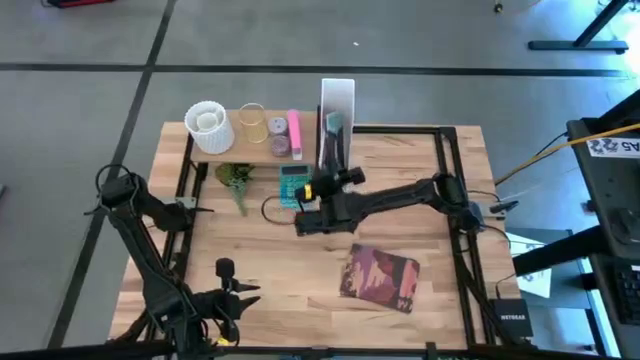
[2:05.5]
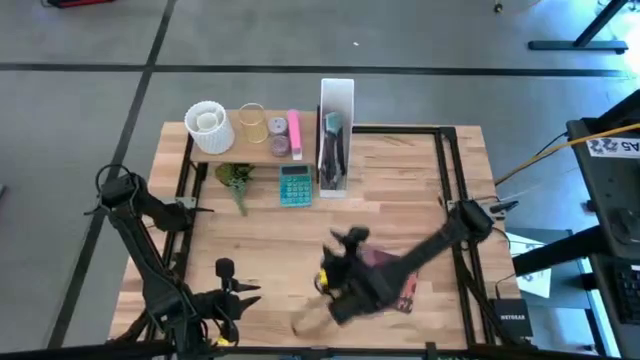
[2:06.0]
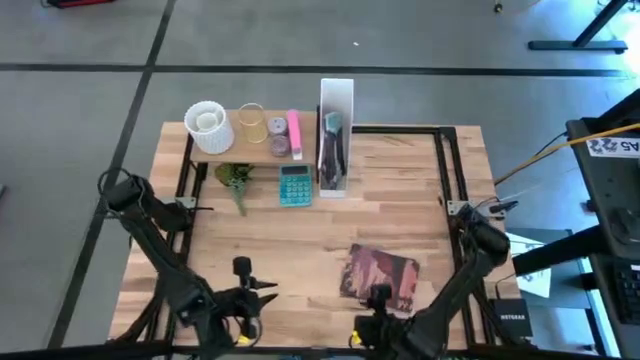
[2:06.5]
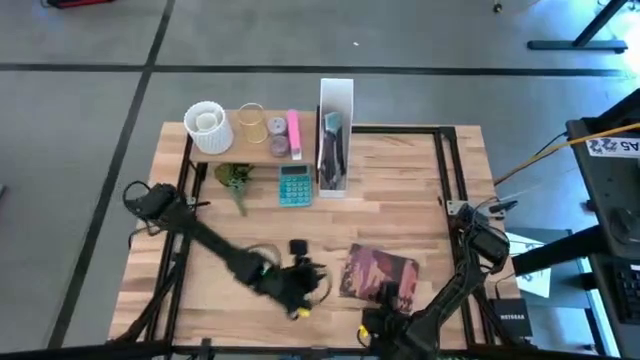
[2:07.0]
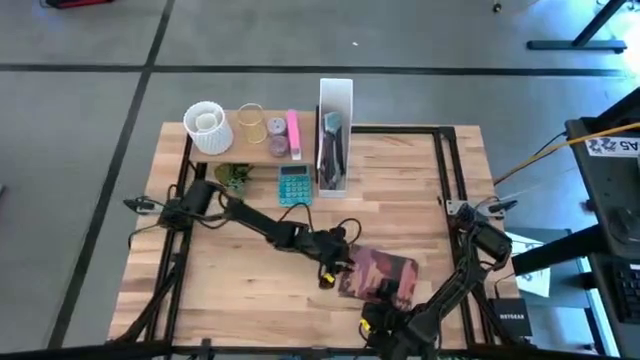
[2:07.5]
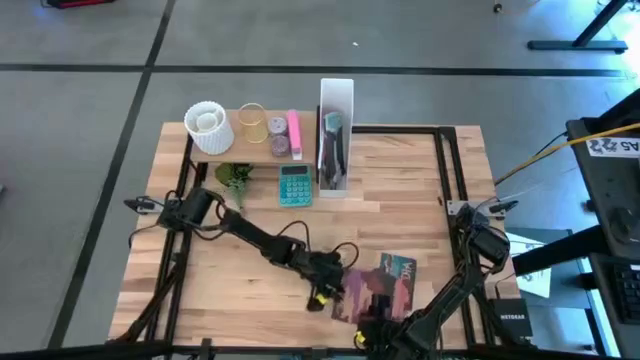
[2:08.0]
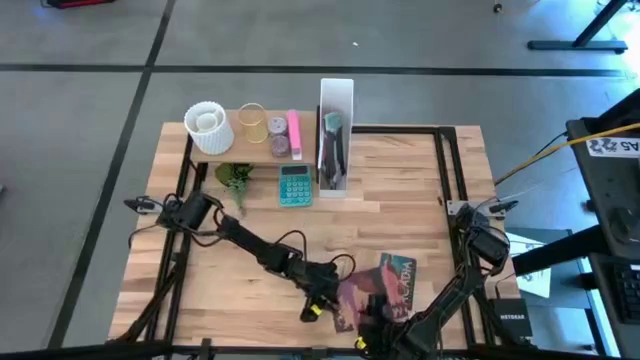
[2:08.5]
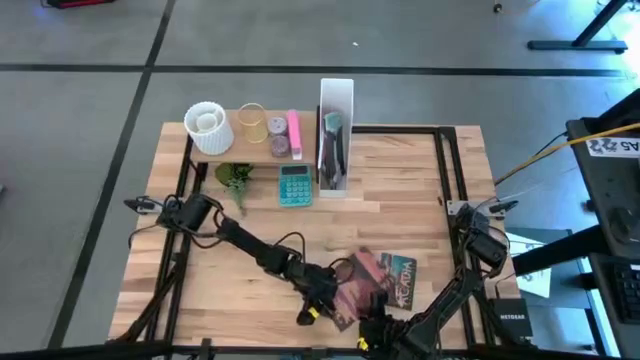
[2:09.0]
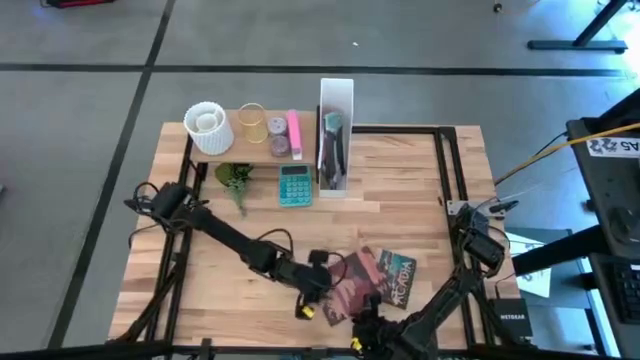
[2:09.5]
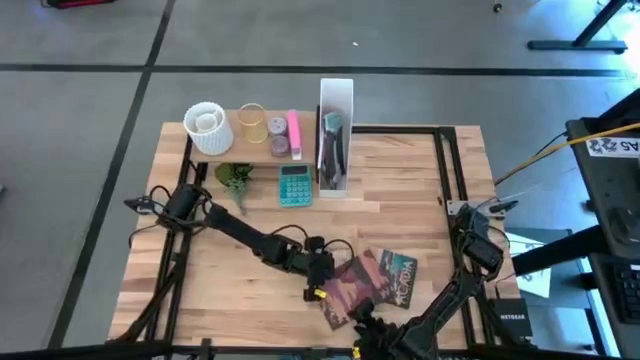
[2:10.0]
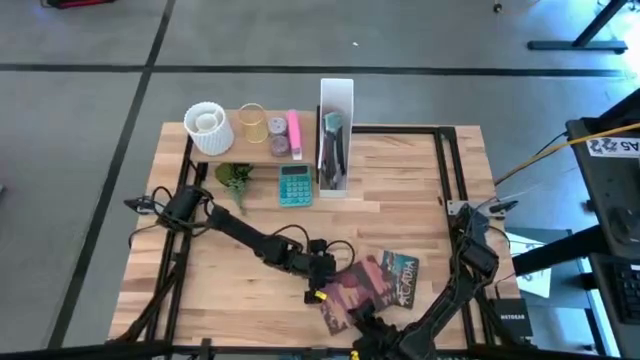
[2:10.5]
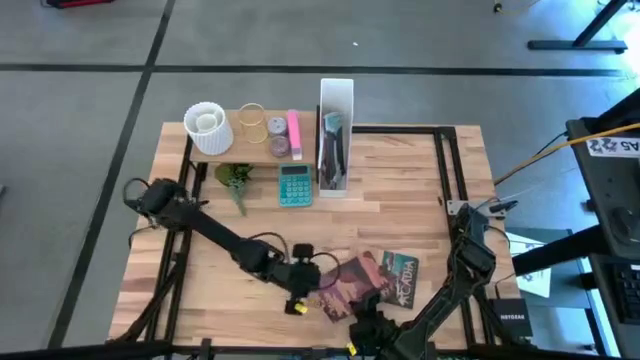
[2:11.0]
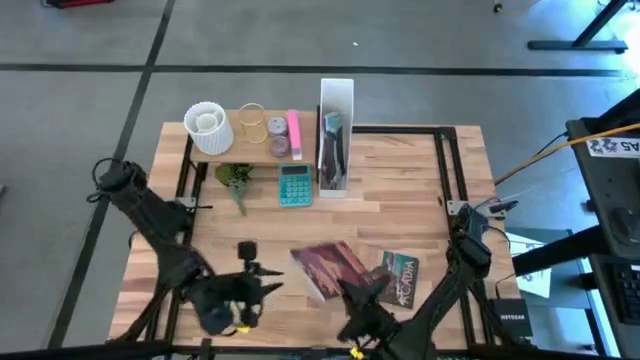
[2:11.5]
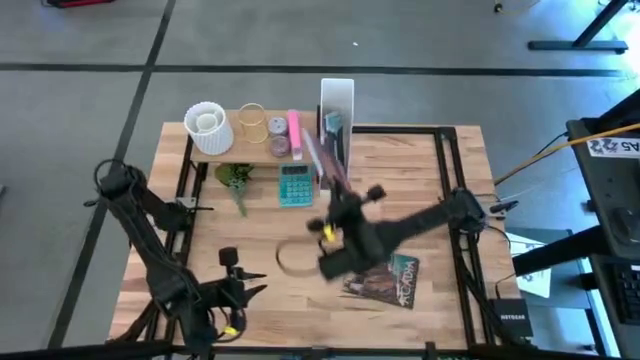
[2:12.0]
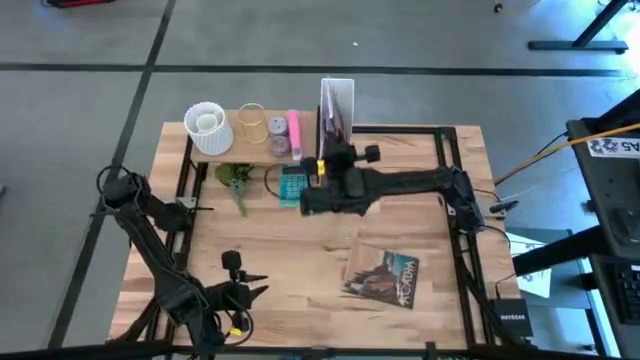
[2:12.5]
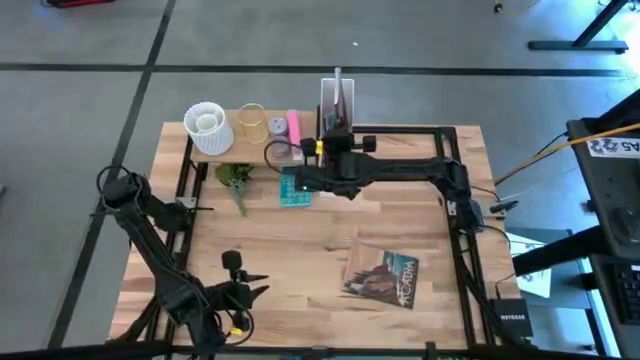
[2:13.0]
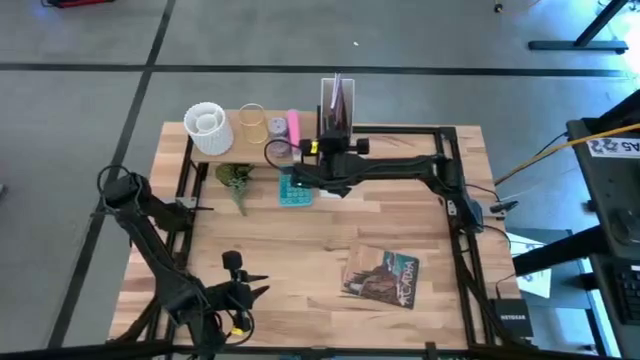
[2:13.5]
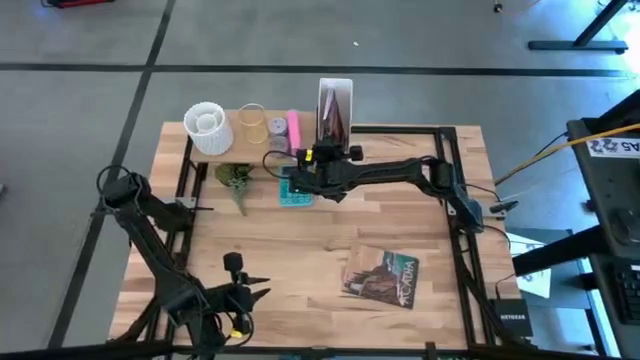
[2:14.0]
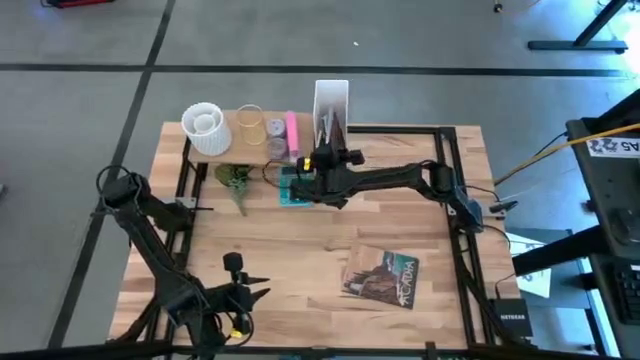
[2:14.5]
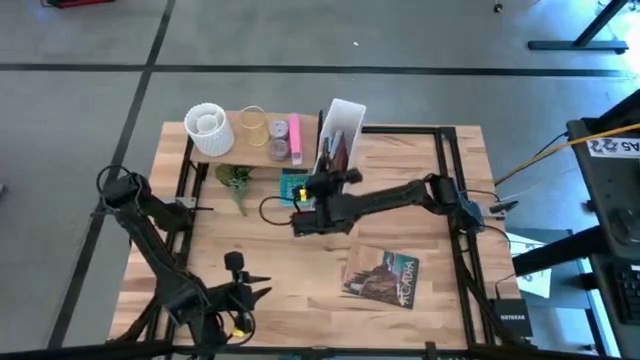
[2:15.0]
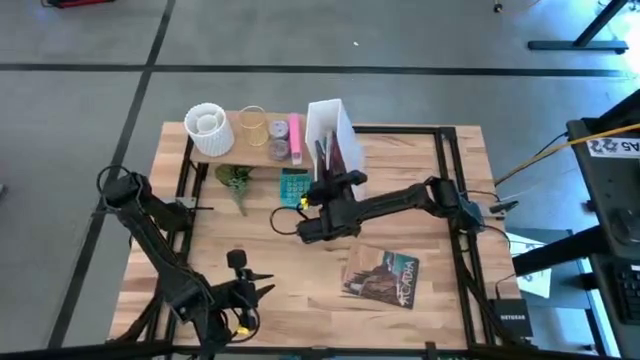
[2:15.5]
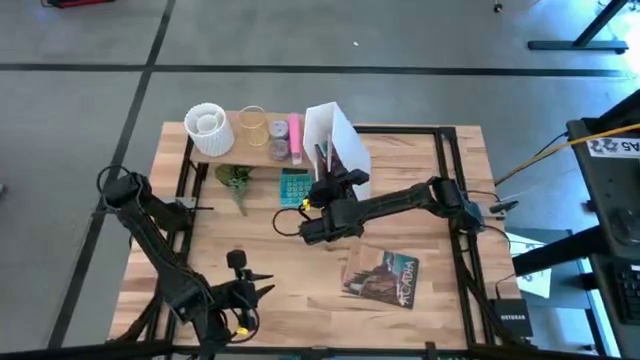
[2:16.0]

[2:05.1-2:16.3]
Task: Stock shelves
Put the purple book into the white bookshelf

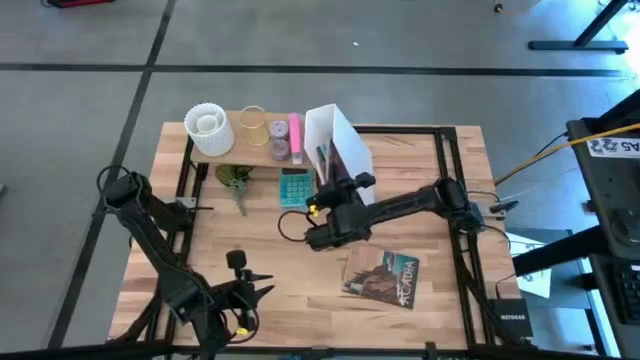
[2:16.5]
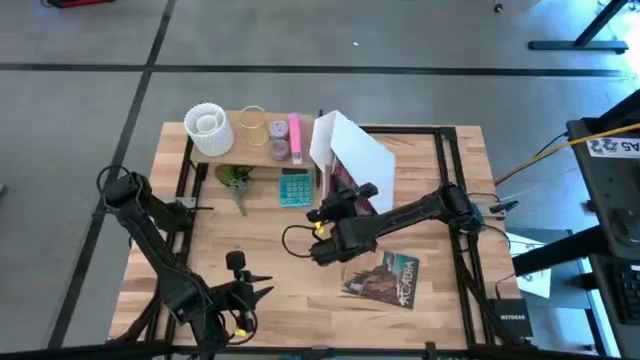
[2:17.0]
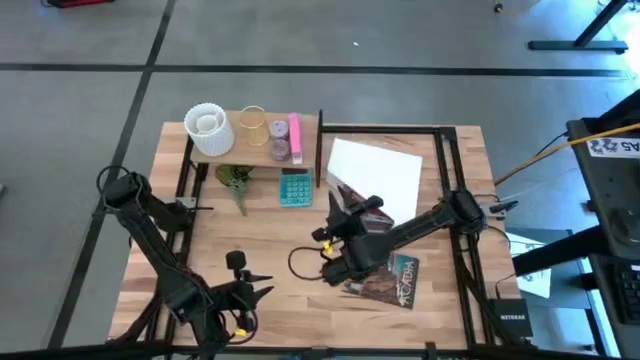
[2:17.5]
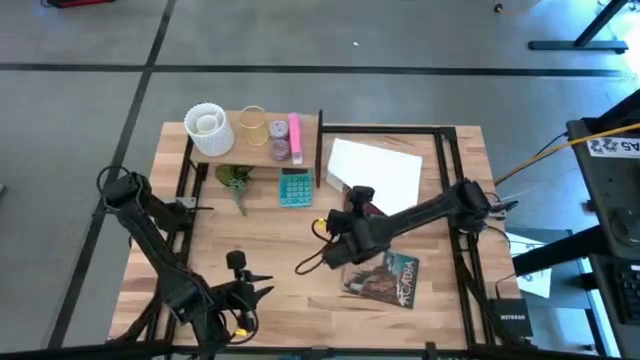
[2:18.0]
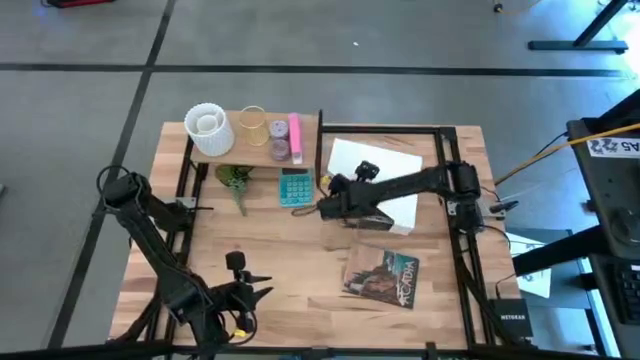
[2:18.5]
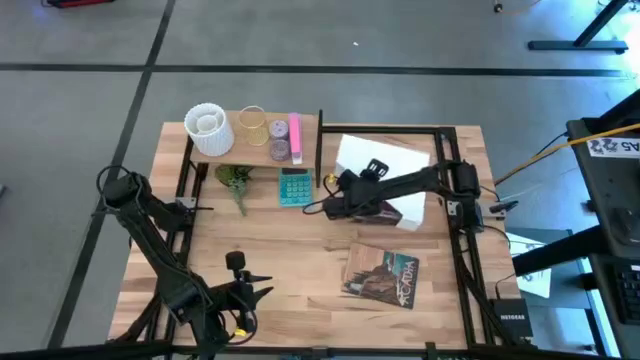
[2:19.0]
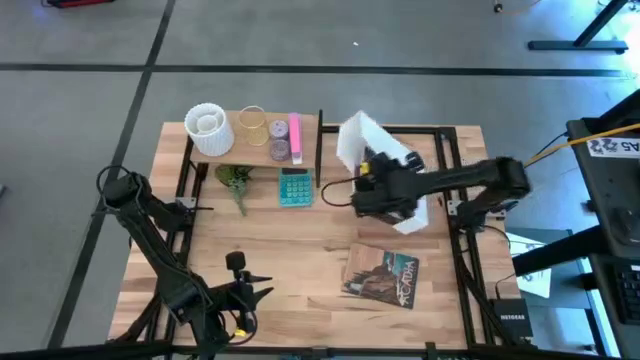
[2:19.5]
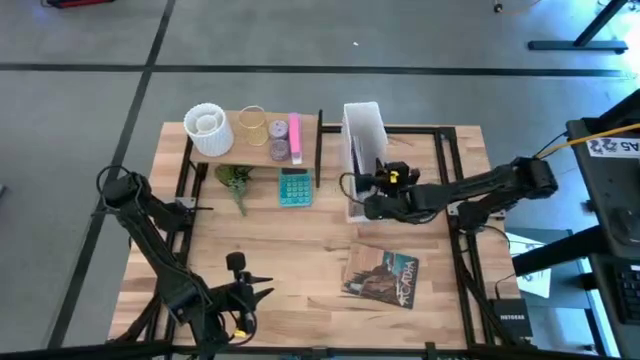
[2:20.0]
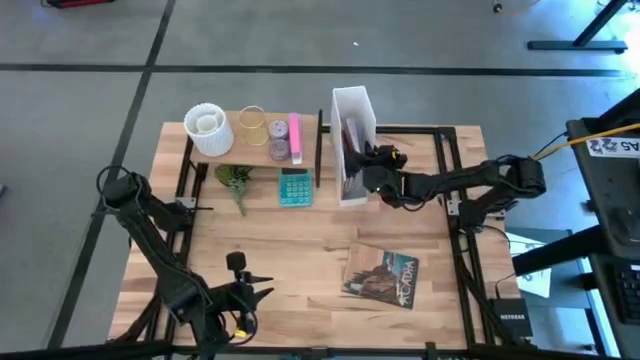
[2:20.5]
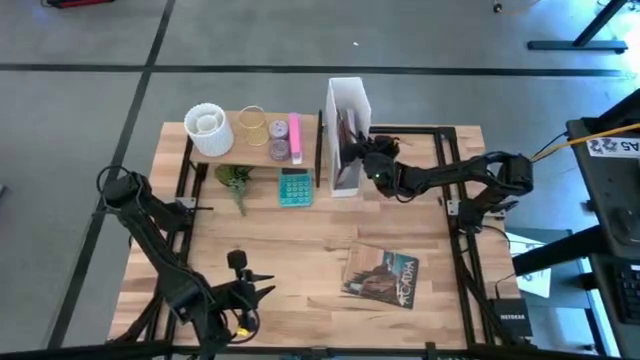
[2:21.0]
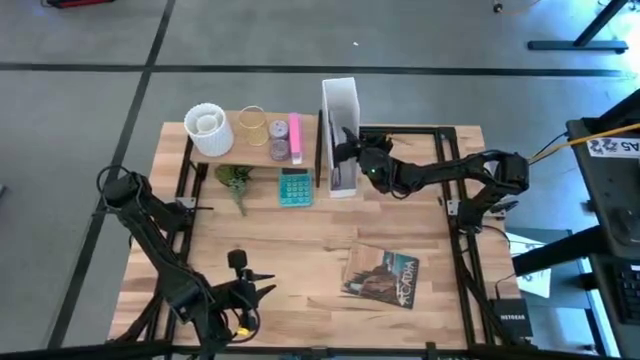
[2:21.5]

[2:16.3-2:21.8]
Adjust the white bookshelf

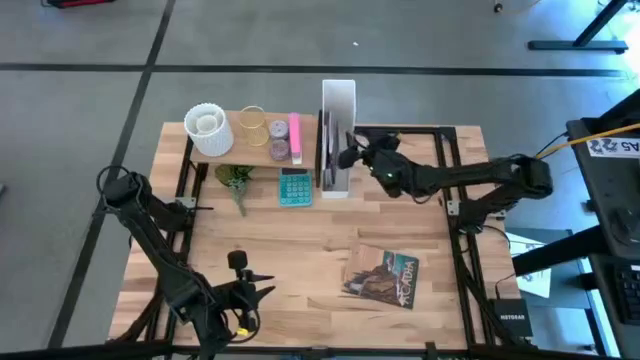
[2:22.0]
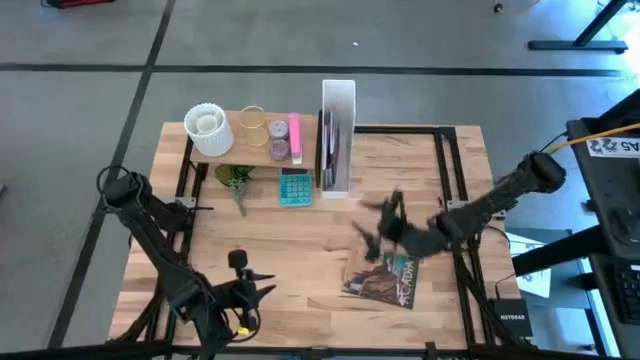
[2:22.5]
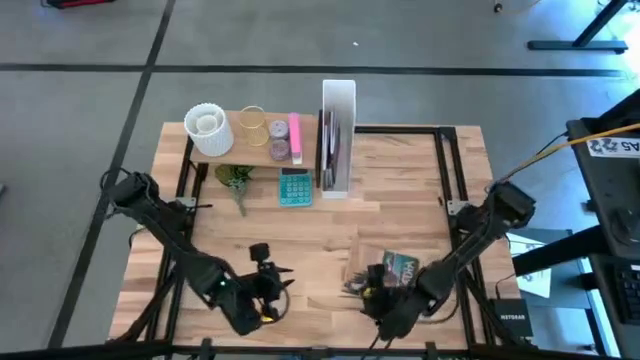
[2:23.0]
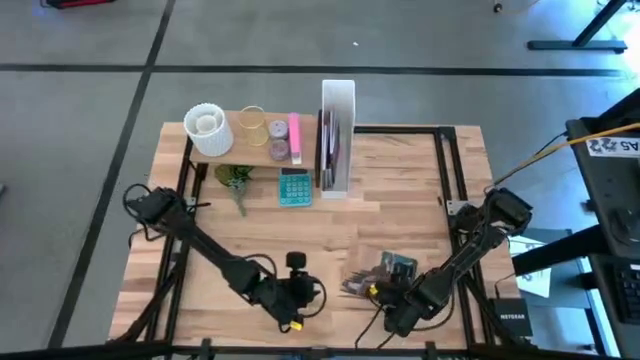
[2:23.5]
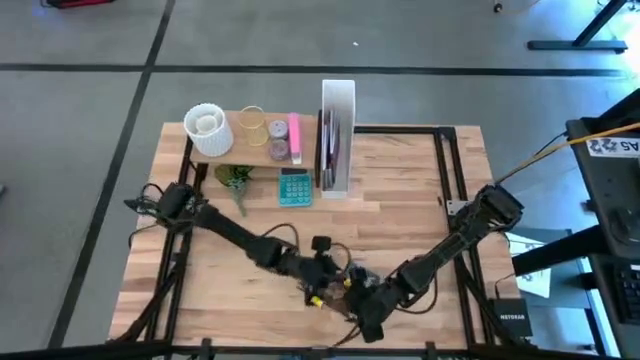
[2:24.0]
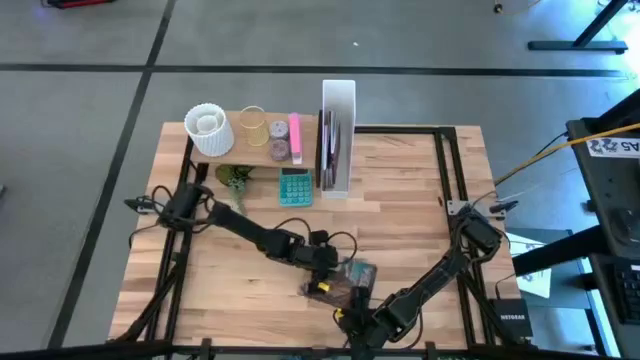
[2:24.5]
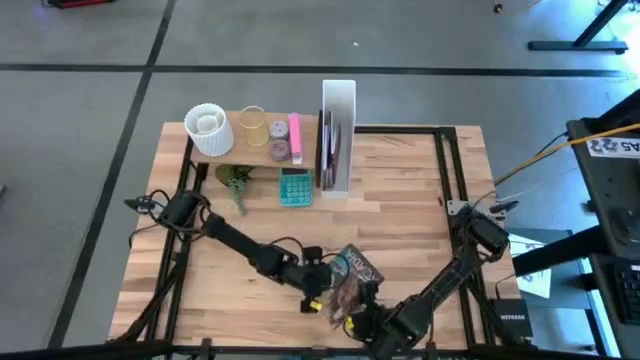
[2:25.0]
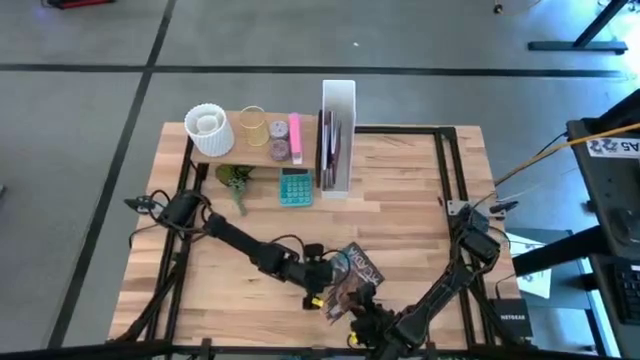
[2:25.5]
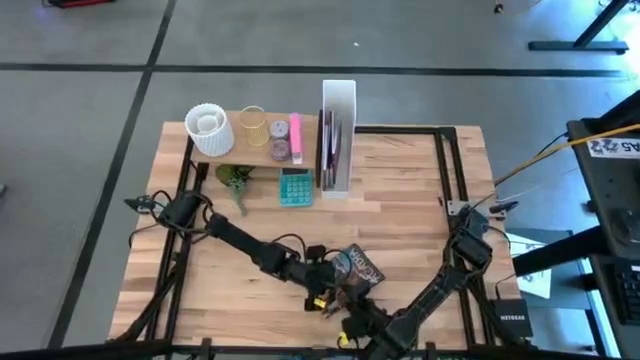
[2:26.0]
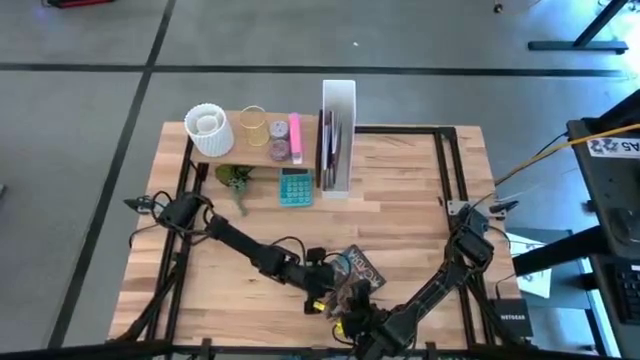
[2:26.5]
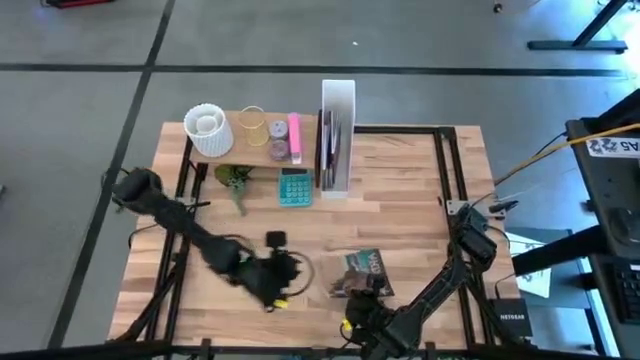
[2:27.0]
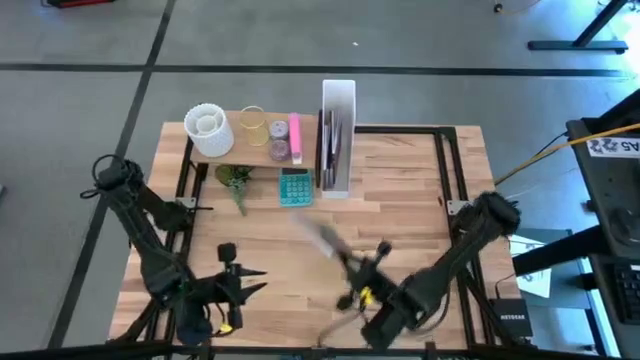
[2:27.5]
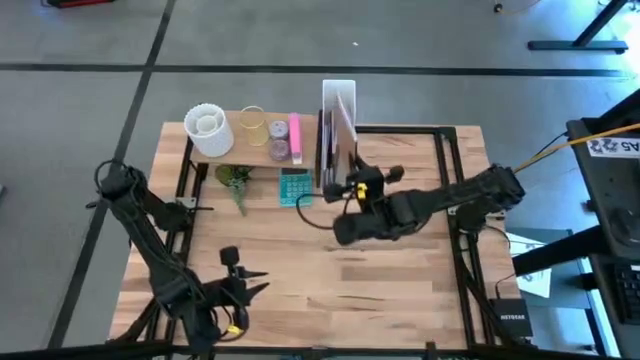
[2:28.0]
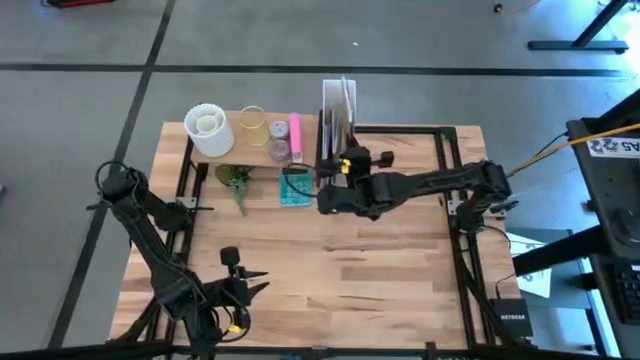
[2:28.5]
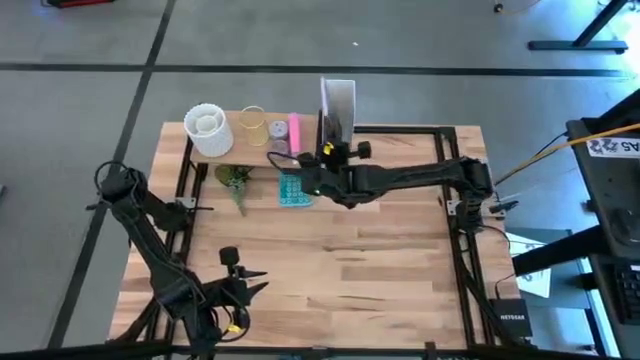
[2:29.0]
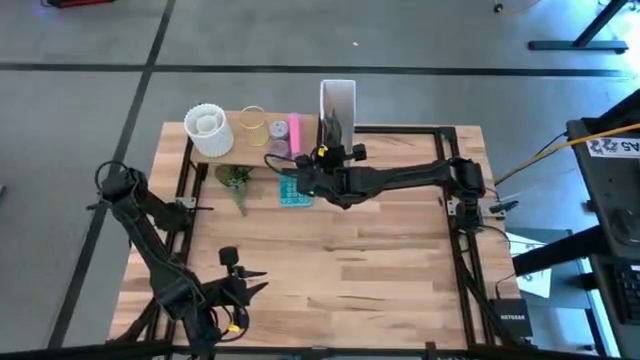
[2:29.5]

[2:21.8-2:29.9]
Put the brown book into the white bookshelf
